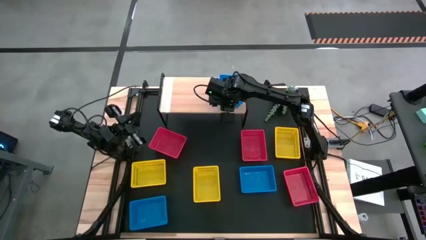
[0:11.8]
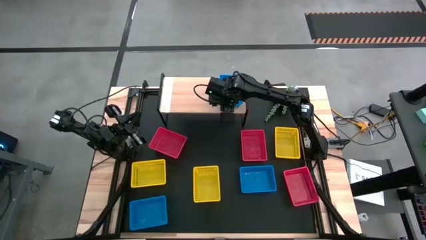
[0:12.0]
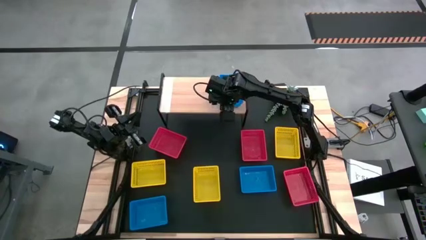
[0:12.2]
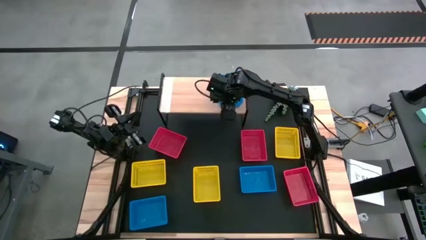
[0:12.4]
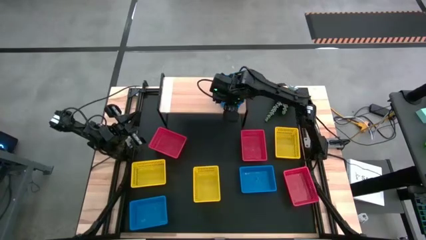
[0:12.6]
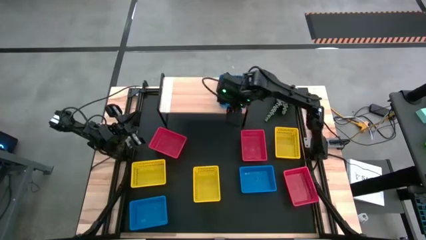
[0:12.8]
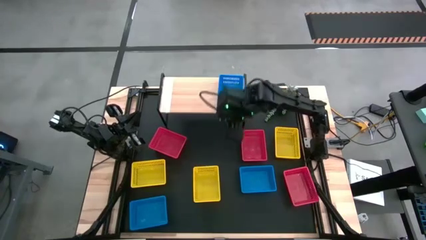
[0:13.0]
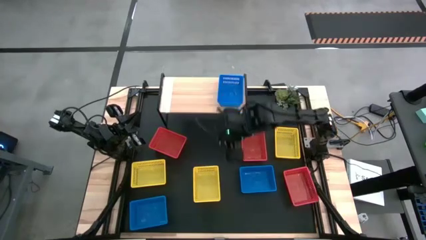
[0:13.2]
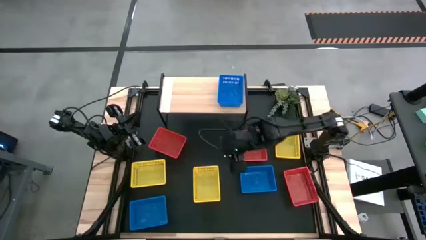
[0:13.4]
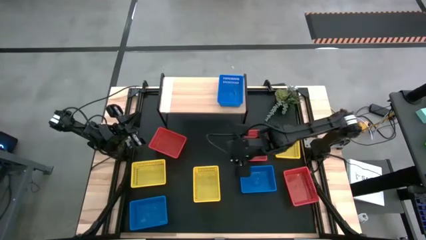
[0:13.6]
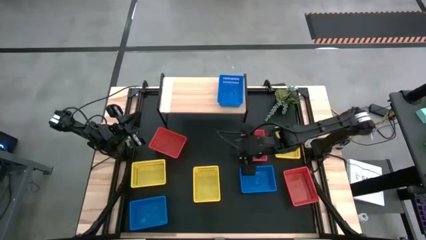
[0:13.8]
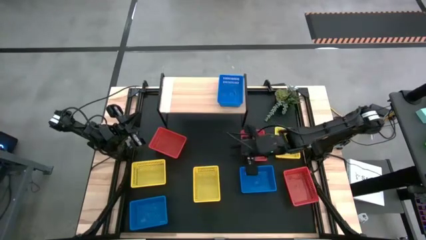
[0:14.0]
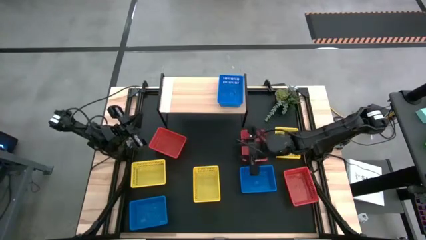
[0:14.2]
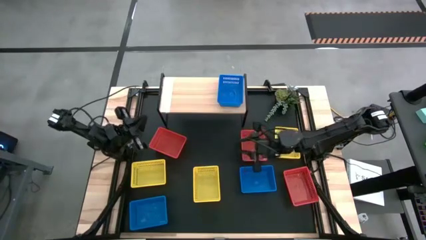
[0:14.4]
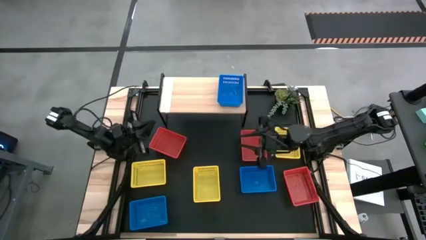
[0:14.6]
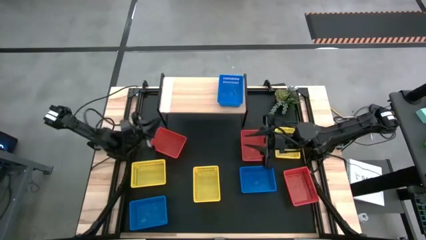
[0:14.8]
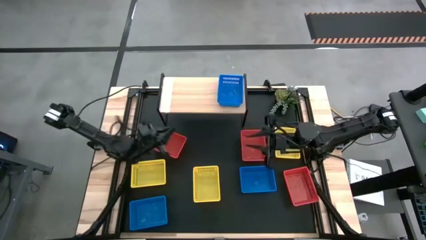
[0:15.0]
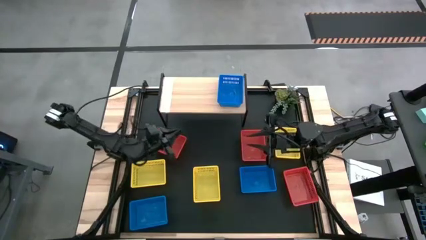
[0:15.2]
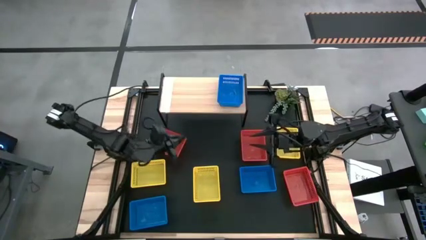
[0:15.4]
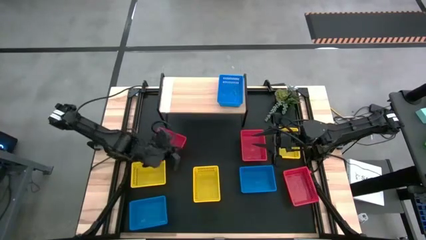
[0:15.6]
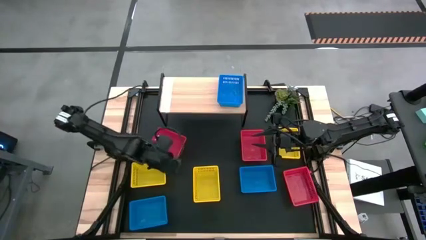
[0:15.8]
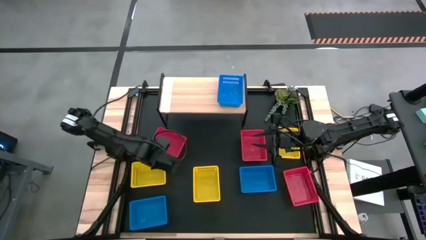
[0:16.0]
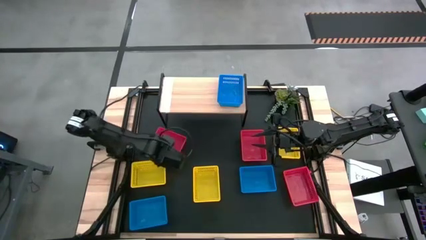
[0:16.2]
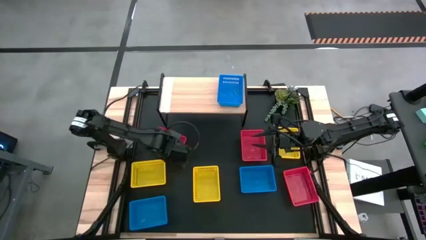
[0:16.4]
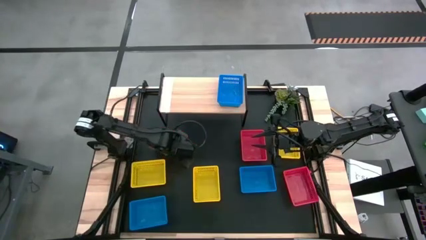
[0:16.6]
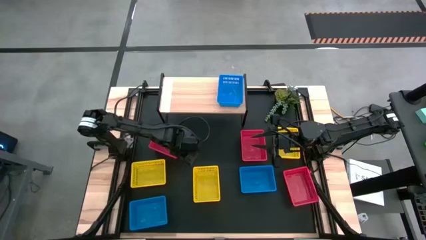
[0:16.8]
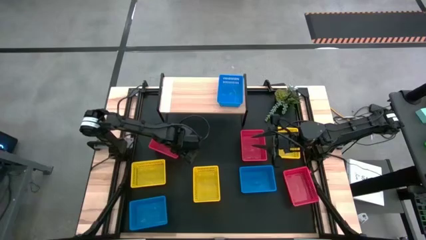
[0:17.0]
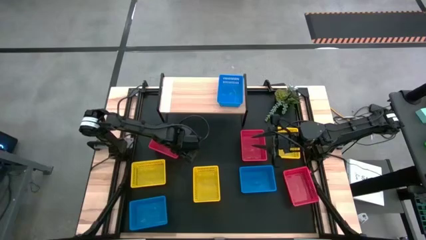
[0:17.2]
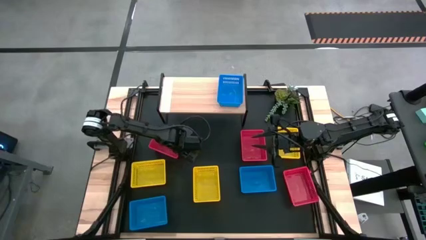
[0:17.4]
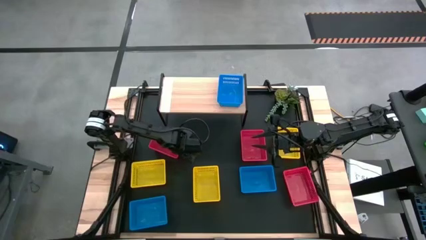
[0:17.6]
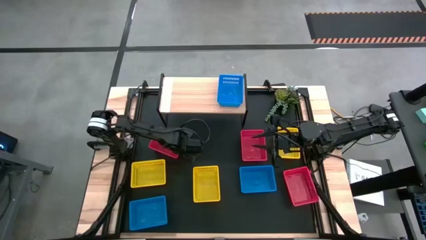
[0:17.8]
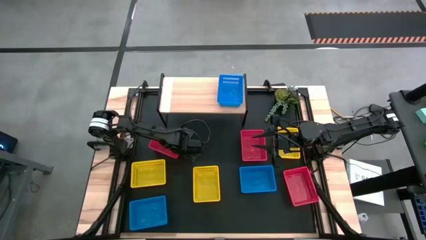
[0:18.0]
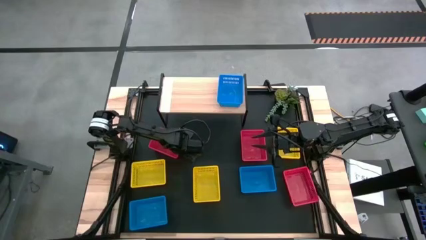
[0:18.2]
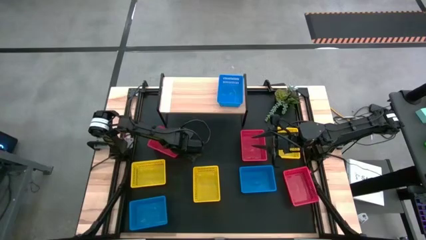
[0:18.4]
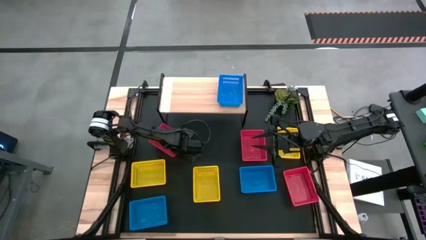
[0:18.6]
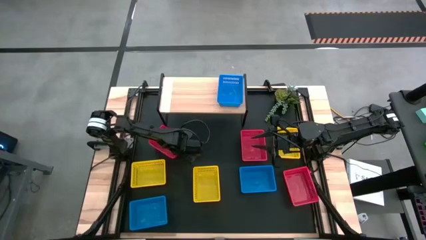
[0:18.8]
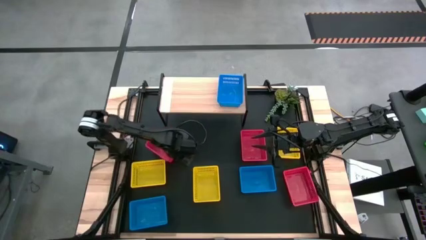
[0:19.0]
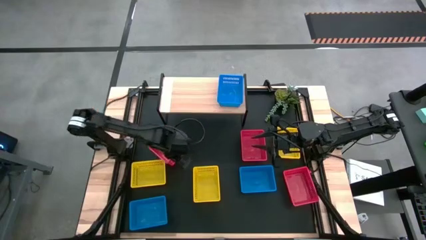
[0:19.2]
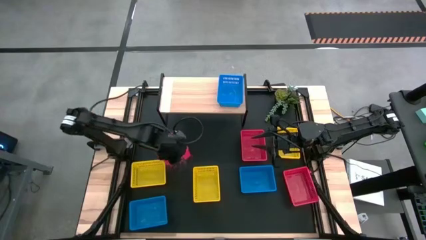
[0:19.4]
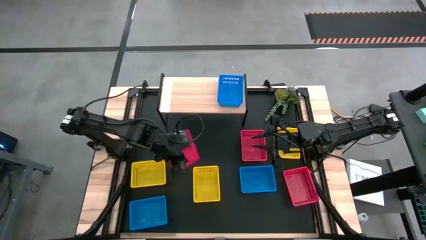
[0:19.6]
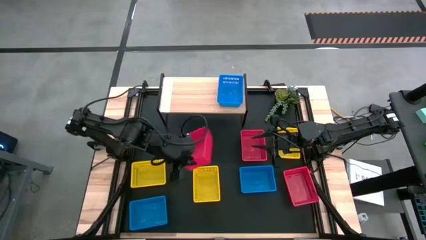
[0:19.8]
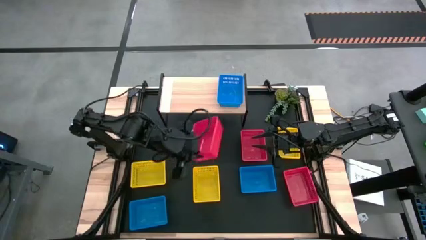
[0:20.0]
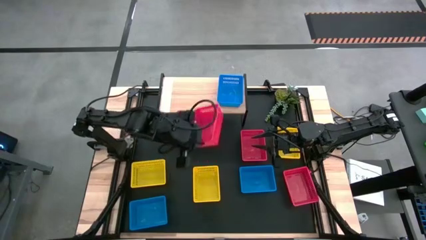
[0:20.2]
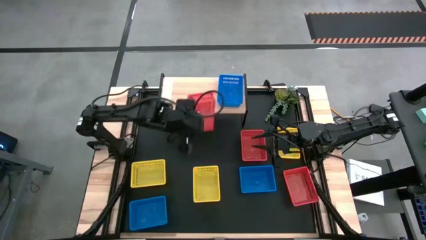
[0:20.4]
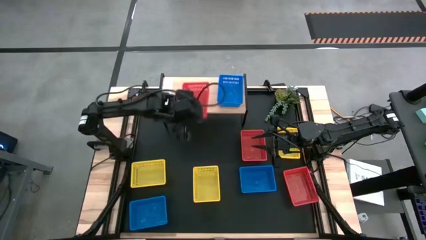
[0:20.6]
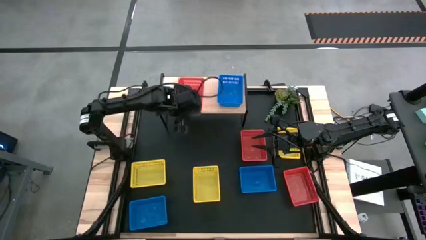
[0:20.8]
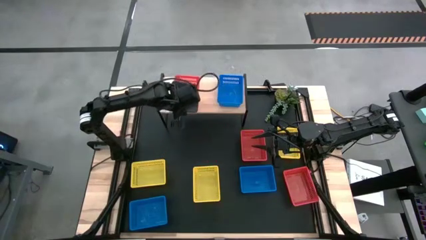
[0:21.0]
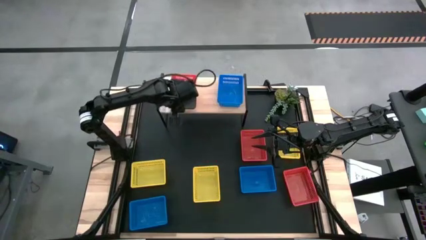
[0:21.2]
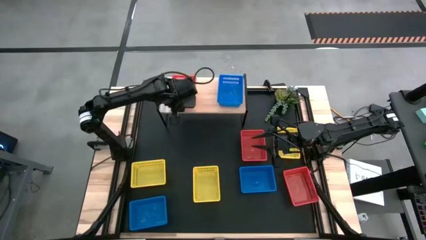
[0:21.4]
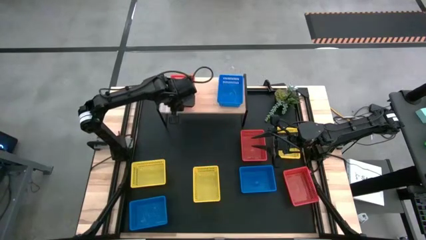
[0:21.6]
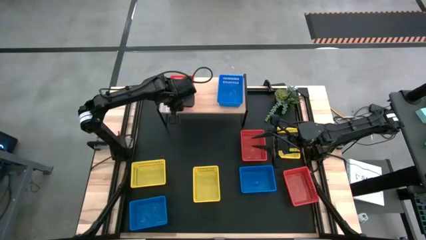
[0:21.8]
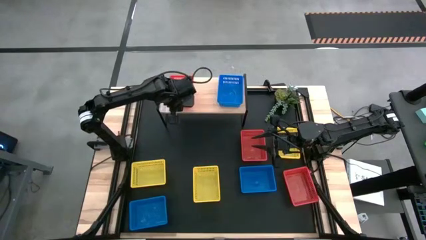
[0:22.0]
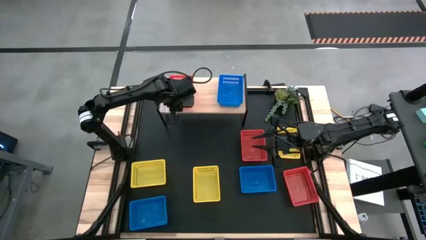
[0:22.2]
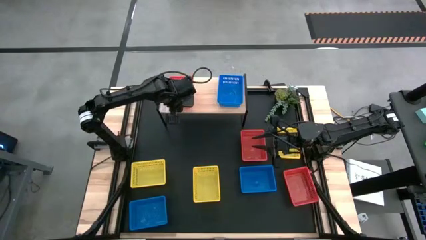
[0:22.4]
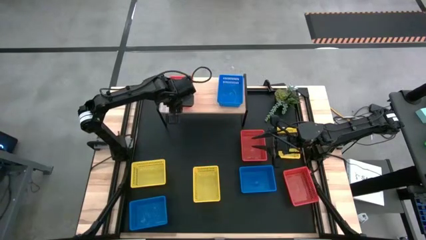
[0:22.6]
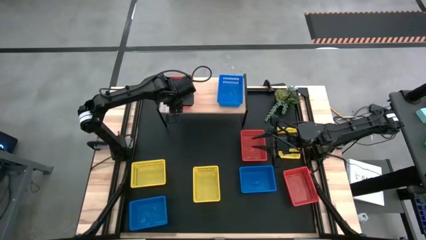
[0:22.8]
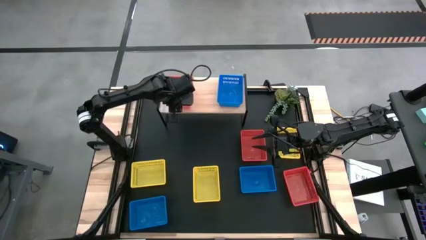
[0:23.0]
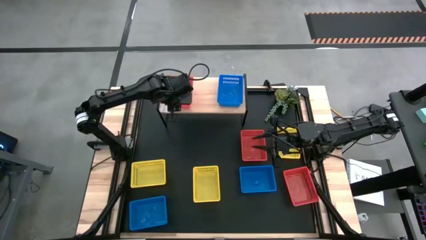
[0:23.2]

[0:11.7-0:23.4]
Task: Stack baskets on shelf by color
Put the left red bin on the shelf

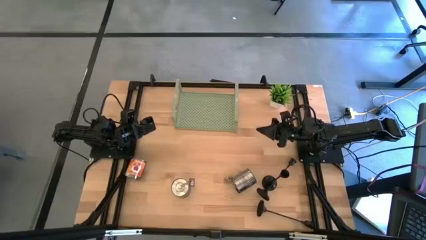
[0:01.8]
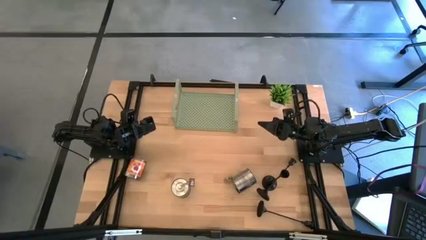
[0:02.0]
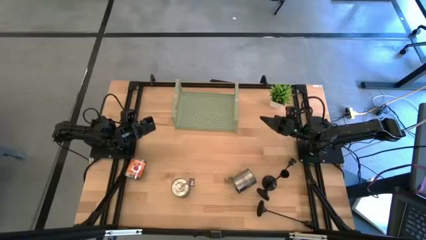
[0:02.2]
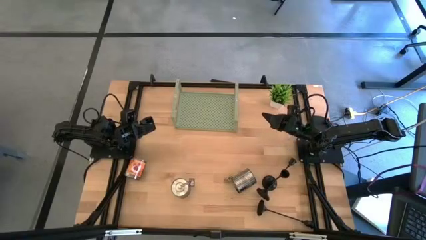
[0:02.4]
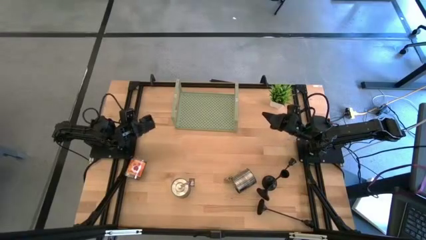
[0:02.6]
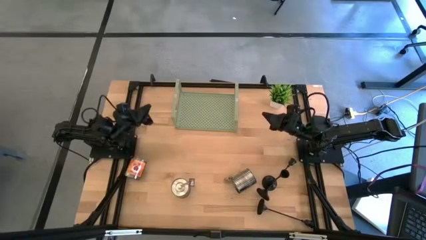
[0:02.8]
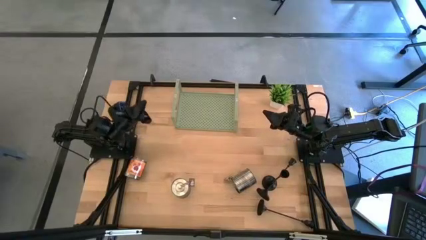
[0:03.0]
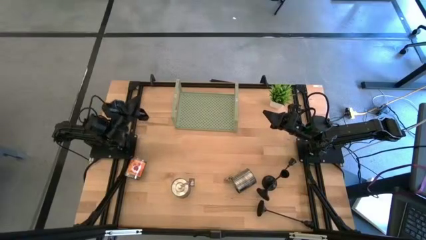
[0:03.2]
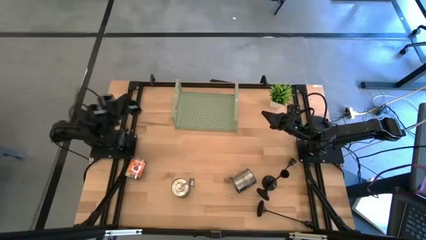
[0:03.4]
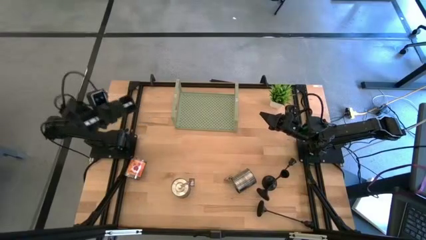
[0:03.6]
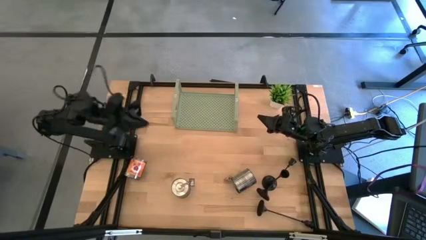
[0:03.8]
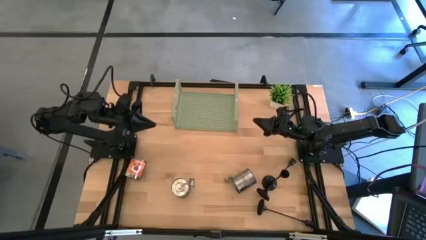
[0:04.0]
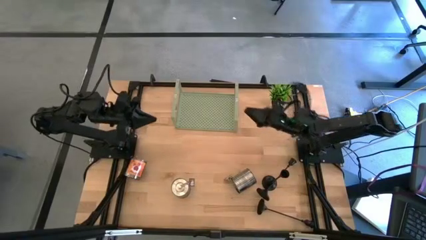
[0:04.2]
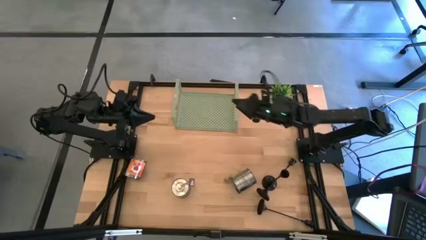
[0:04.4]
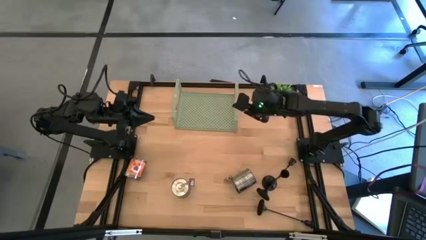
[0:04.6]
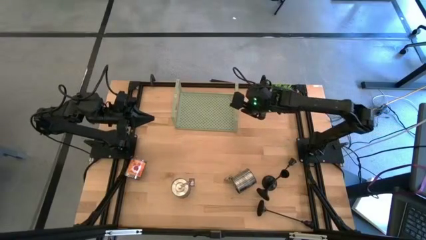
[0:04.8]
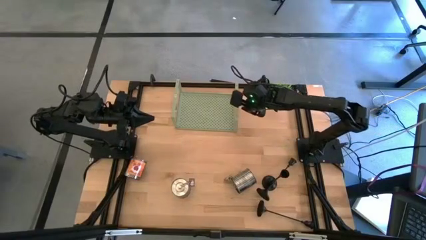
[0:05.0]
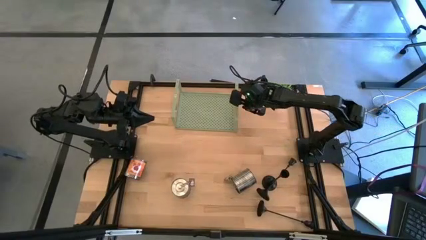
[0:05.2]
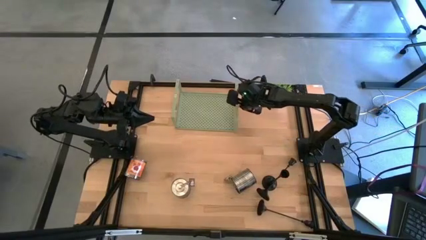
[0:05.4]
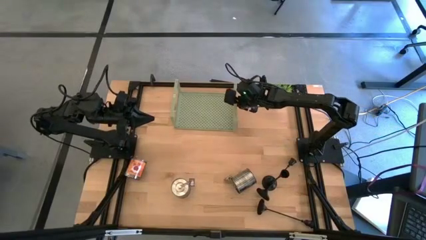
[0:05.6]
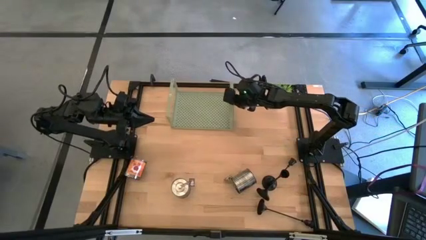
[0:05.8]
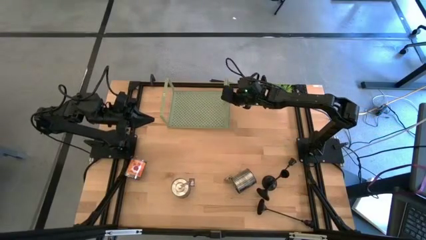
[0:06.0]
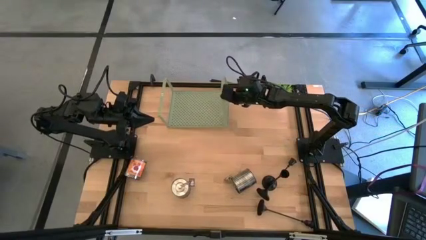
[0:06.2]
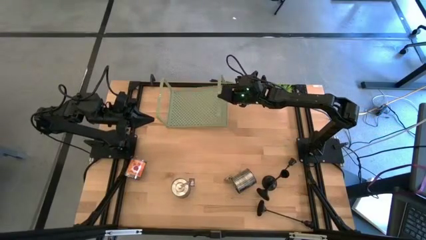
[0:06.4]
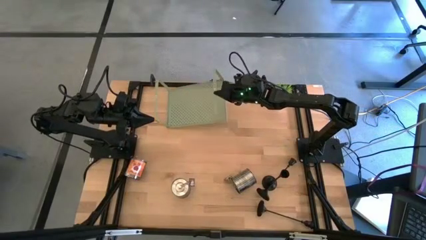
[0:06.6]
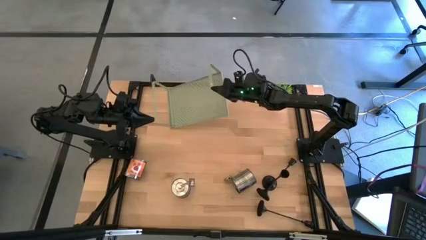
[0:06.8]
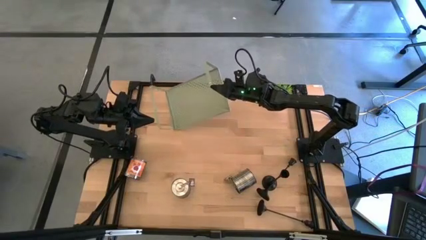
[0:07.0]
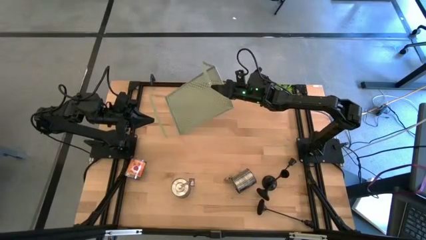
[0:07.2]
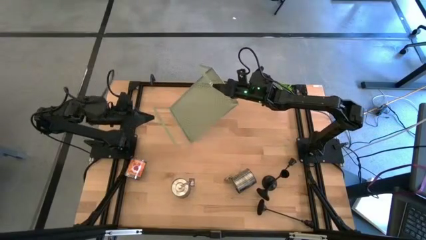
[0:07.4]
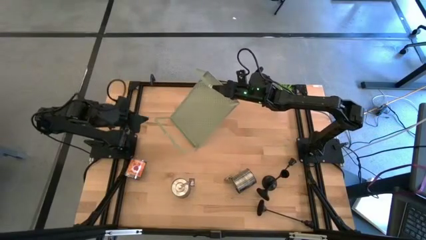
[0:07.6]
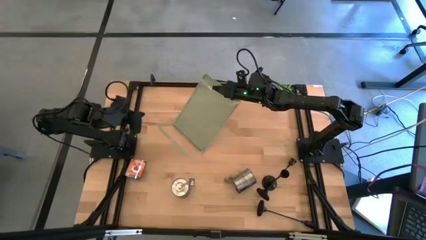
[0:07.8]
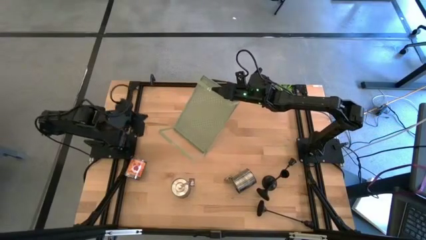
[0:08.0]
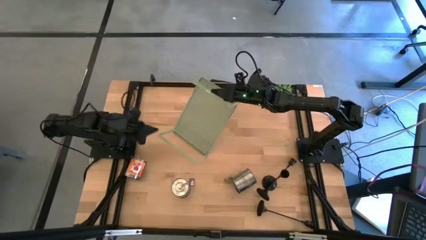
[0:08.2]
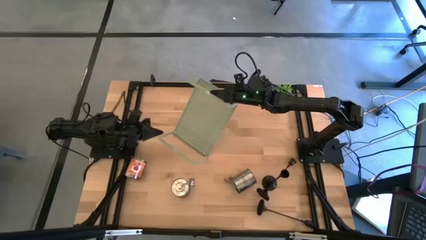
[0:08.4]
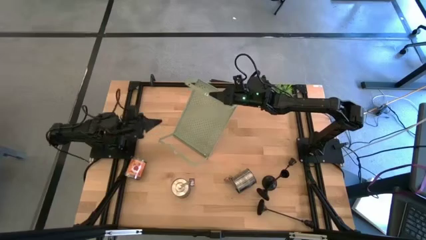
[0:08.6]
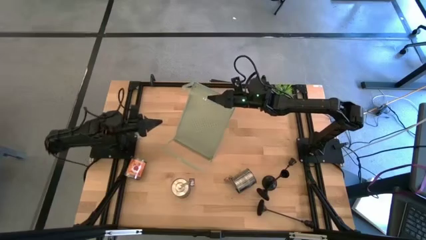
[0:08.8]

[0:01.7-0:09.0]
Task: Pick & Place candle stick holders
Prepare the shelf
